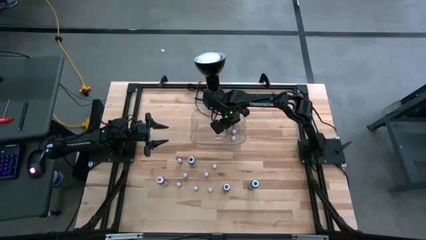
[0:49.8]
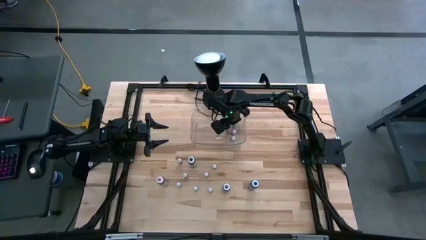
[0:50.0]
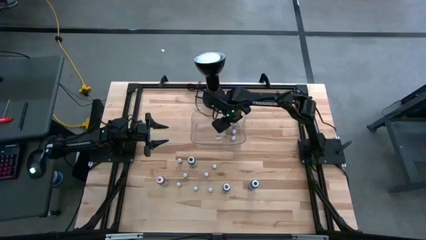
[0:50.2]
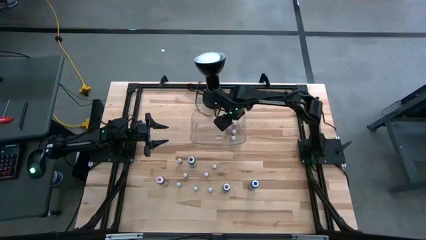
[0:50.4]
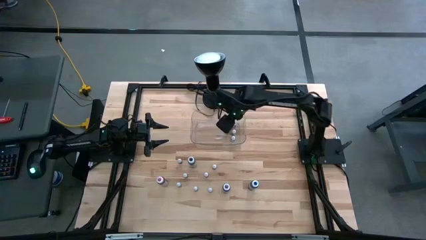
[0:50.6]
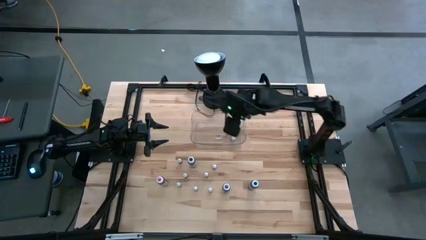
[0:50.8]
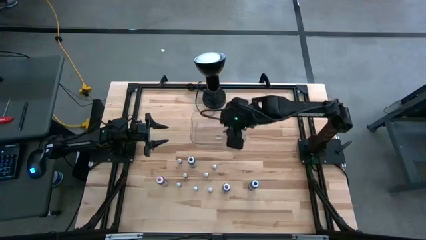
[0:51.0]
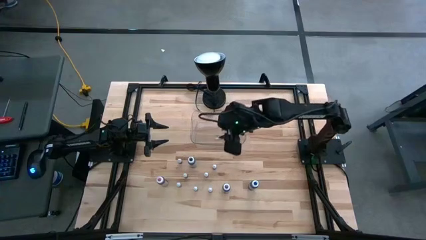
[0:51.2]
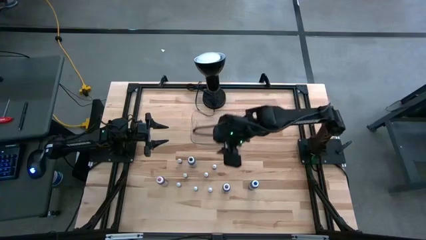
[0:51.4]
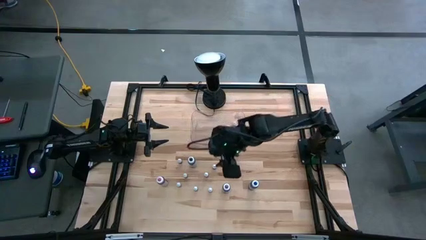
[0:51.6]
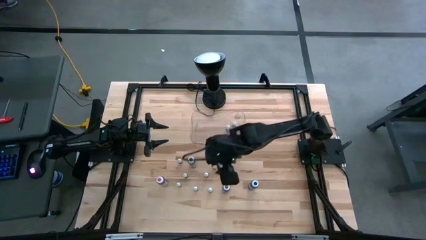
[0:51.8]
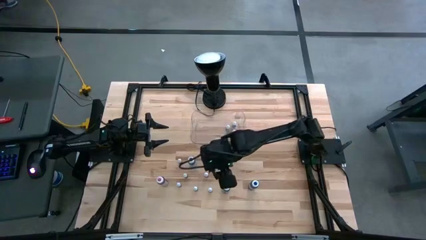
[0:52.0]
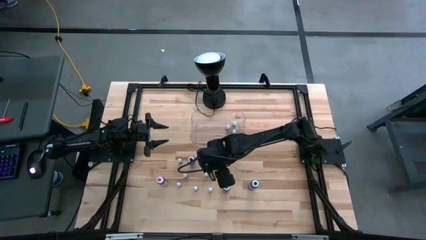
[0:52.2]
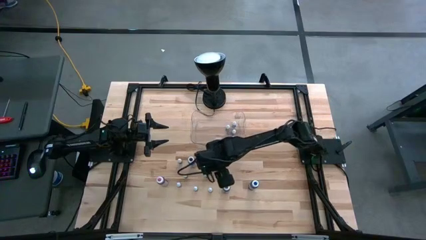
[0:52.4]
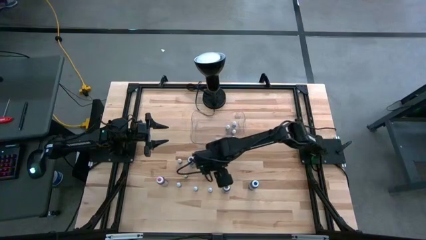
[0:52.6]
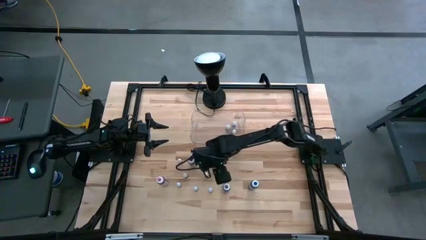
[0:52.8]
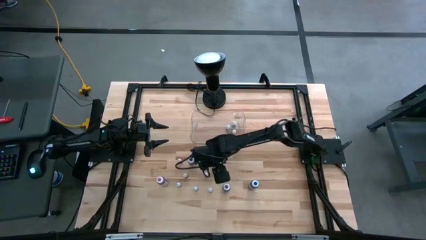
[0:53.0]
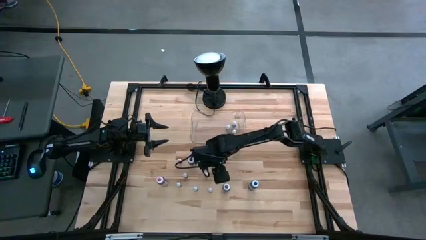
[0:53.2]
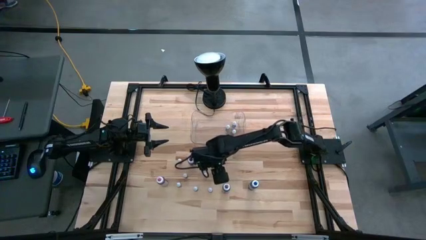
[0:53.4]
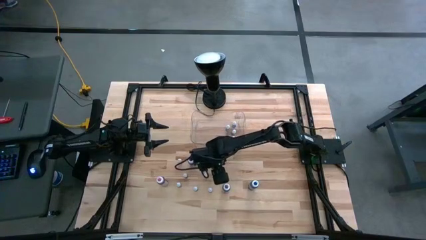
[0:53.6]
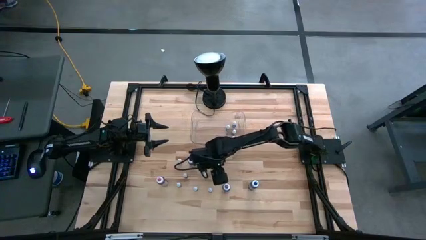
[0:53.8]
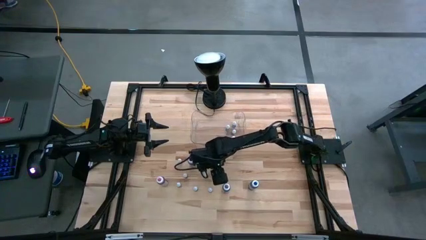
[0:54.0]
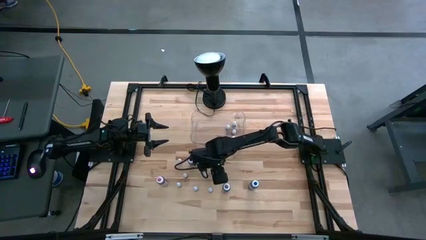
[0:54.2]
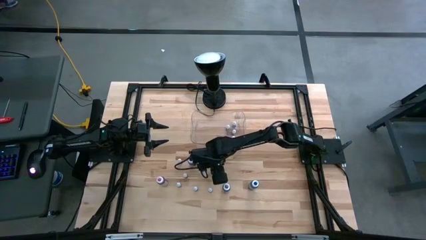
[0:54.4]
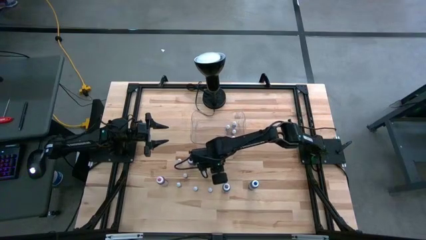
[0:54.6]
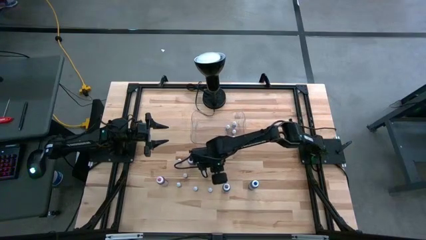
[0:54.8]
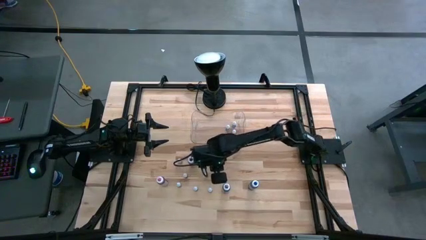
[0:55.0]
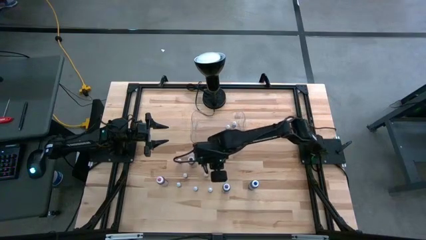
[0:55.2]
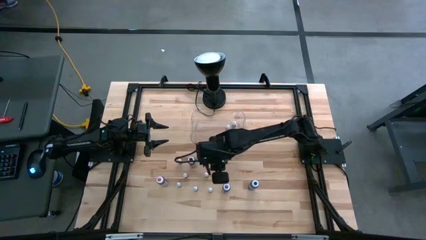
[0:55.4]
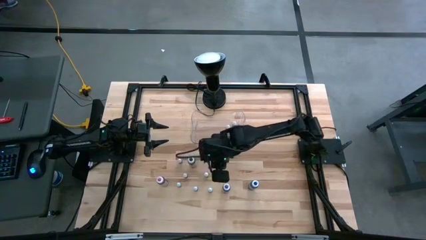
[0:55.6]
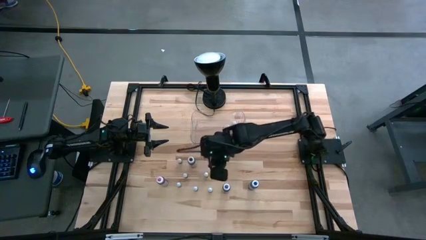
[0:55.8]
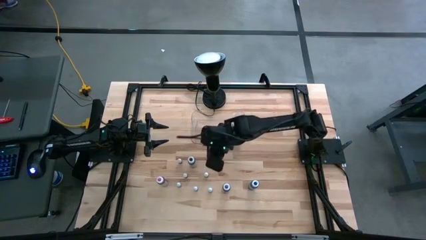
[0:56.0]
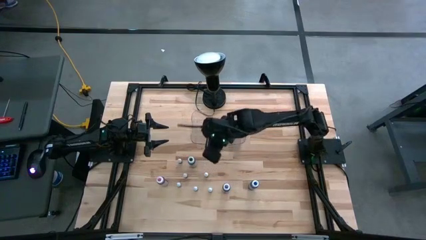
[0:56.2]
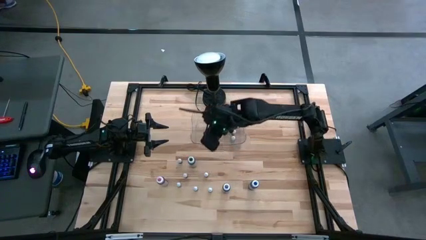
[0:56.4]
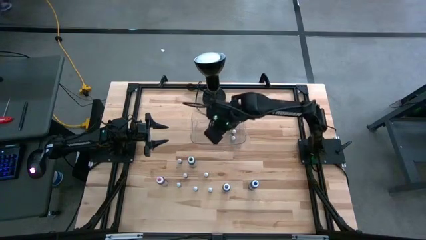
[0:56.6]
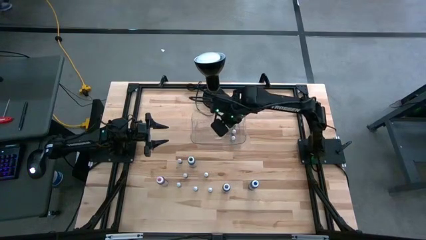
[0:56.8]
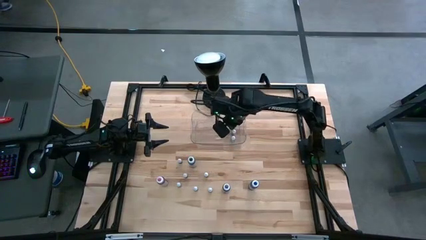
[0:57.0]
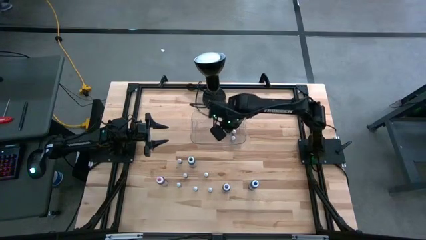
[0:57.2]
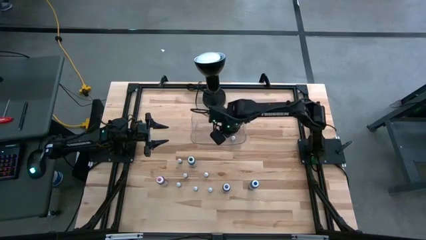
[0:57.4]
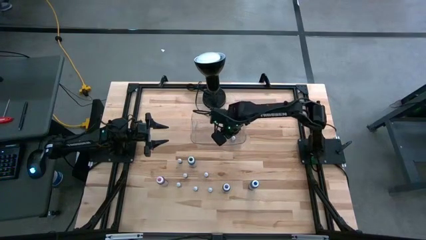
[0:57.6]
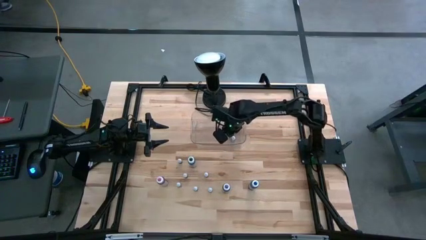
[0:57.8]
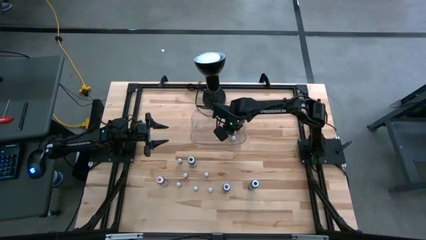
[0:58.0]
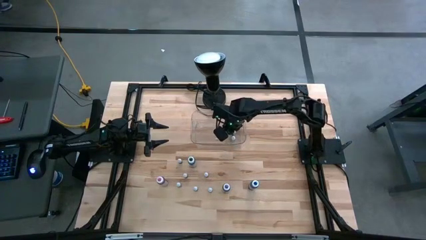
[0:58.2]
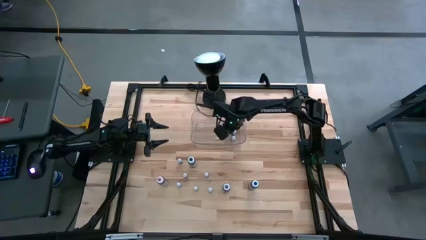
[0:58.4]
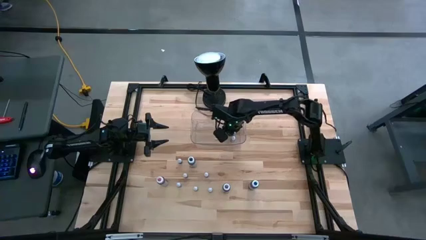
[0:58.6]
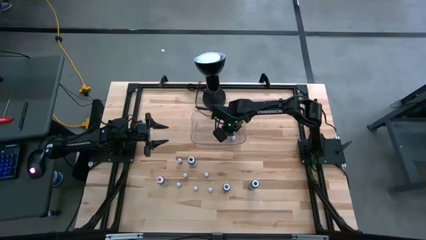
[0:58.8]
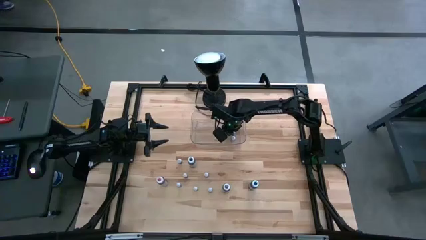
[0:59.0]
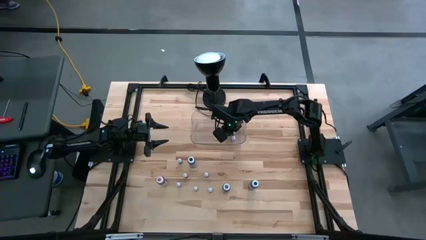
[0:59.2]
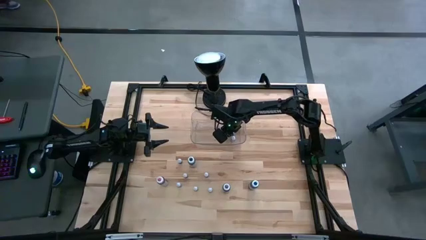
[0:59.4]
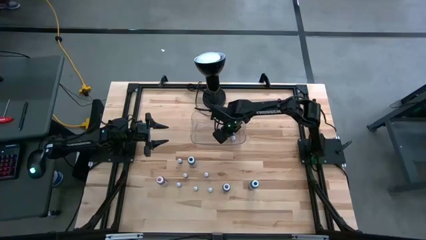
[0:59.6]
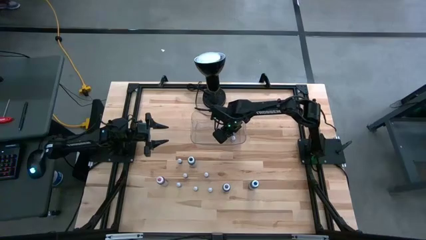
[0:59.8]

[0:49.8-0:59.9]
Task: Pick & Place food coloring
Put the green food coloring bottle into the transparent bin
